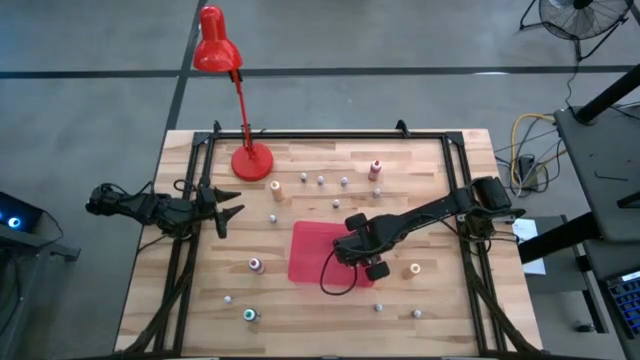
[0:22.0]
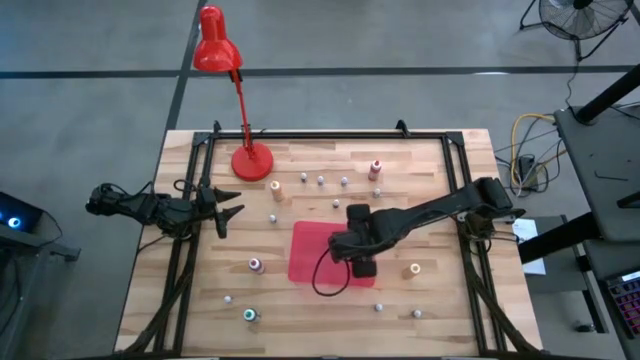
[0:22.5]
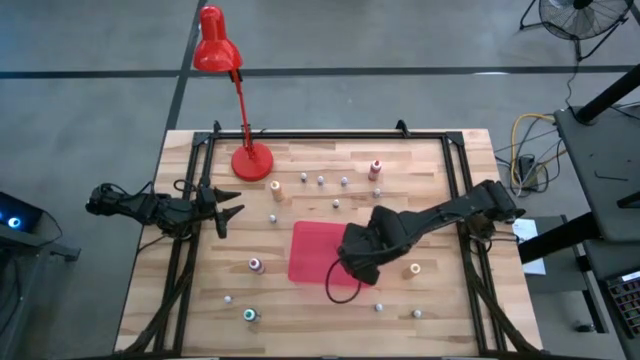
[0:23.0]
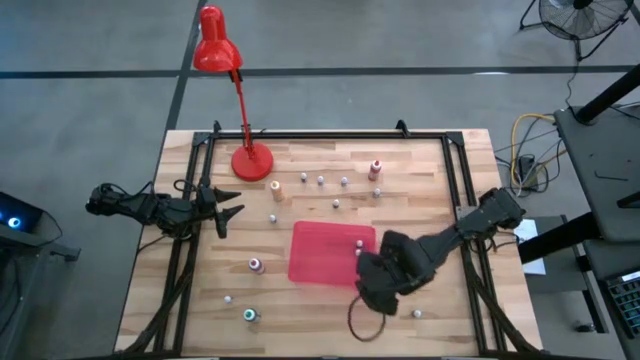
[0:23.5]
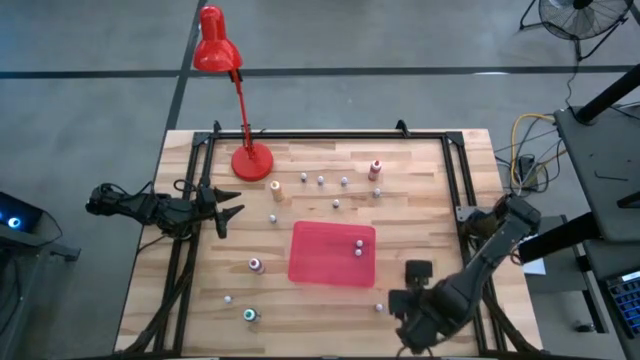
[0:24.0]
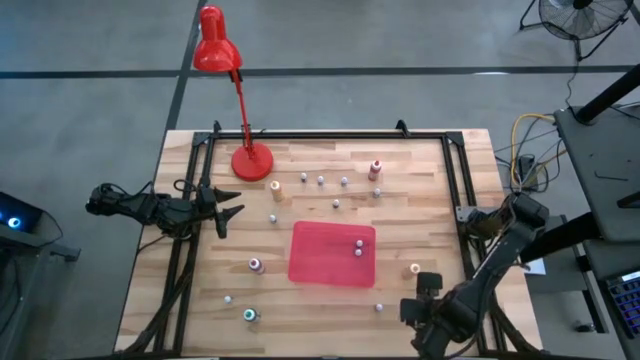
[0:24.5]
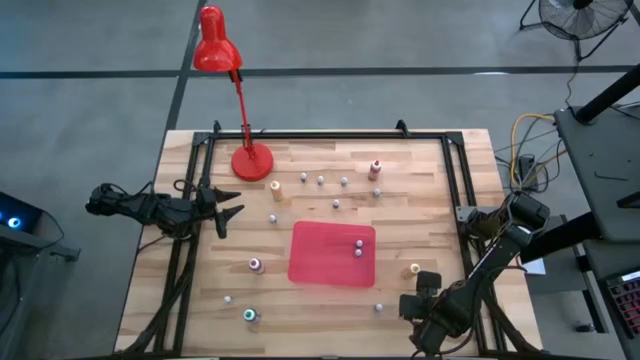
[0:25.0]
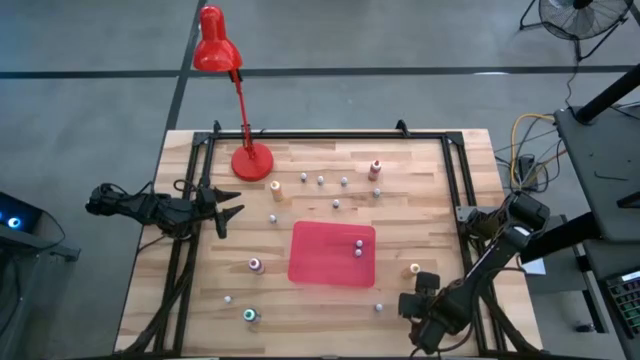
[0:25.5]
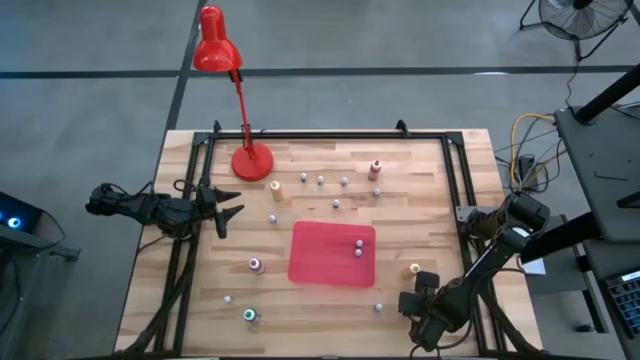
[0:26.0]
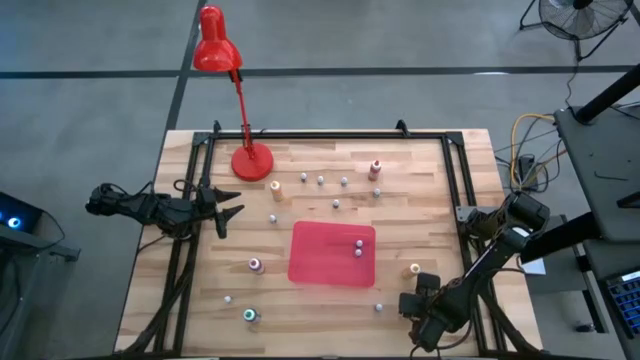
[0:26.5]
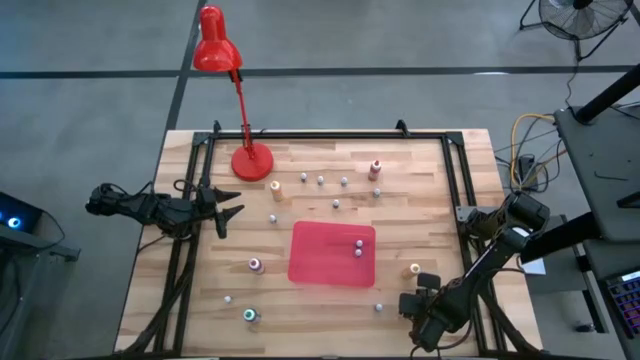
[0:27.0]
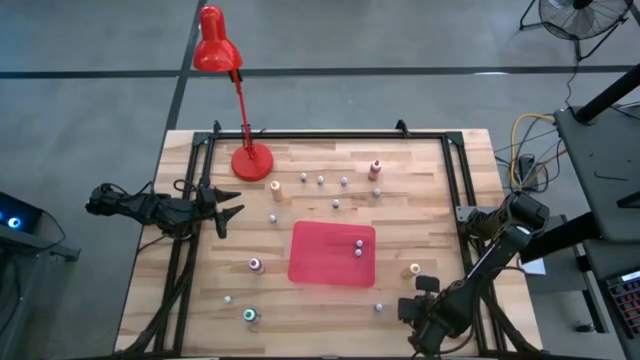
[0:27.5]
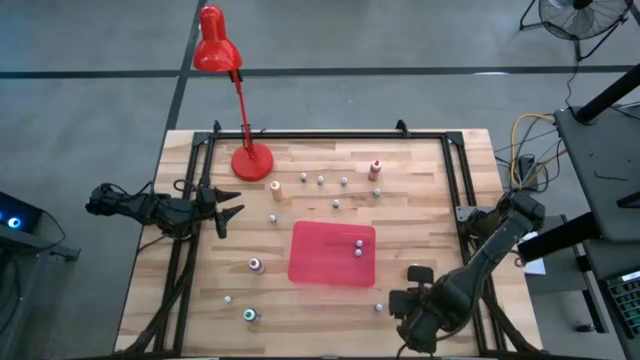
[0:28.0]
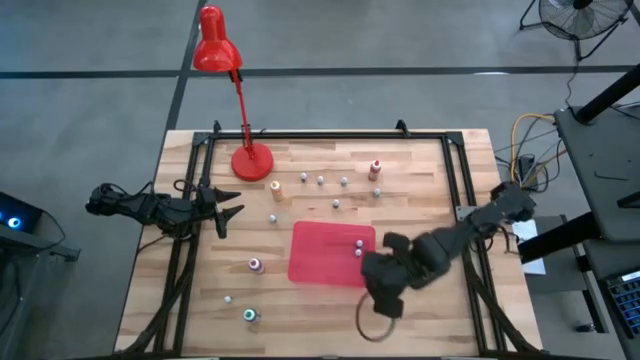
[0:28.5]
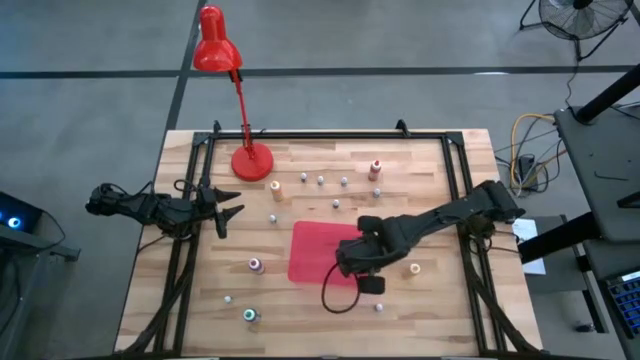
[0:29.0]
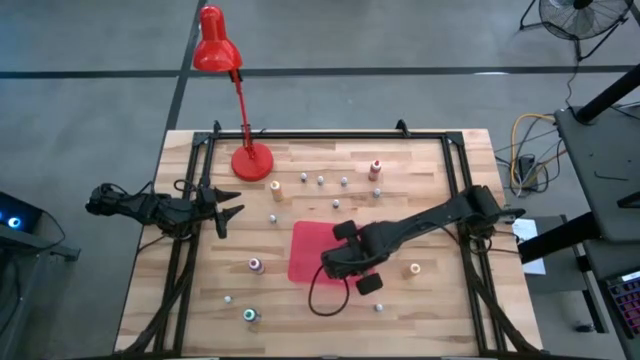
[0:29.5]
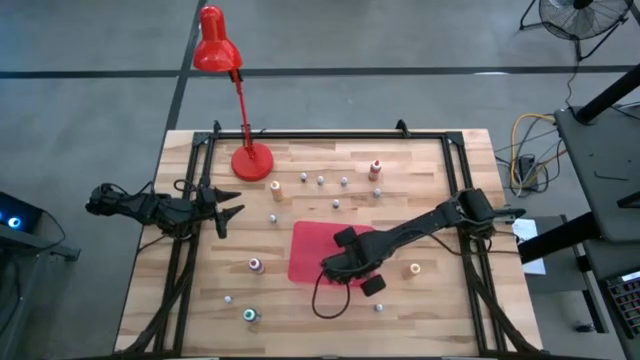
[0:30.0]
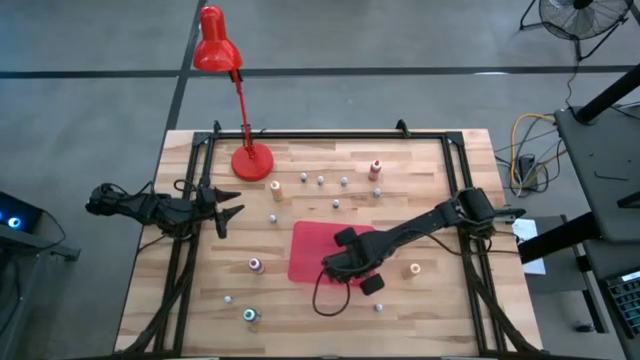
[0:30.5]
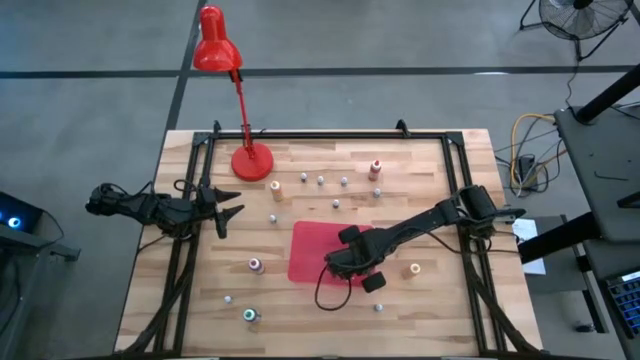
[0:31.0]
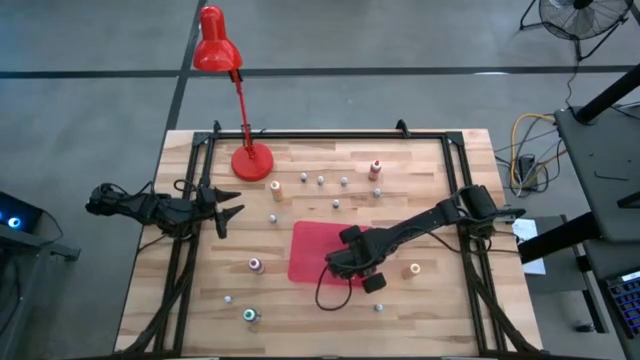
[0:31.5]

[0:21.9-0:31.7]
Task: Pick & Place food coloring
Put the small green food coloring bottle in the red bin

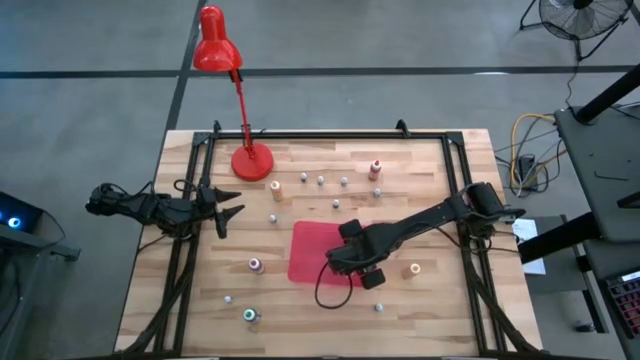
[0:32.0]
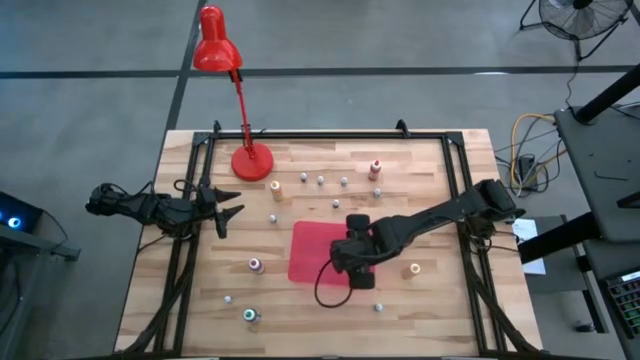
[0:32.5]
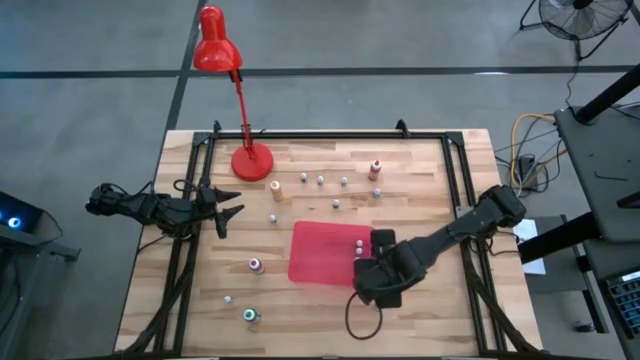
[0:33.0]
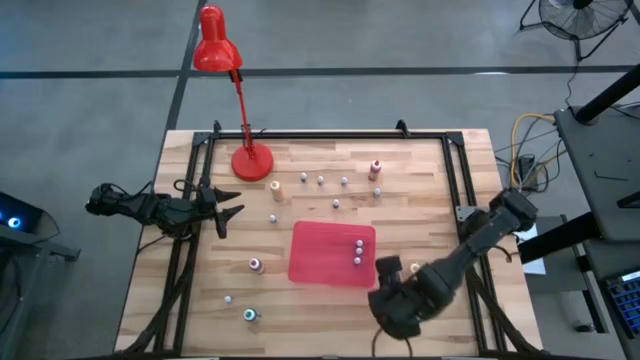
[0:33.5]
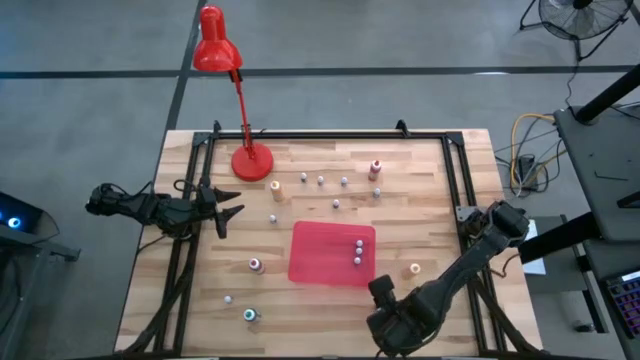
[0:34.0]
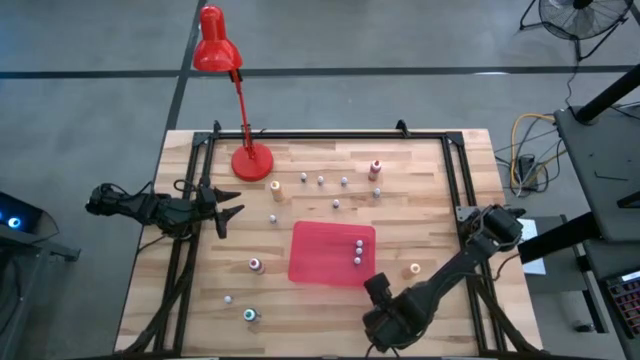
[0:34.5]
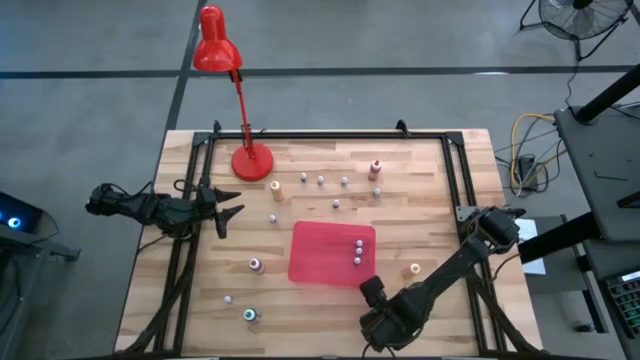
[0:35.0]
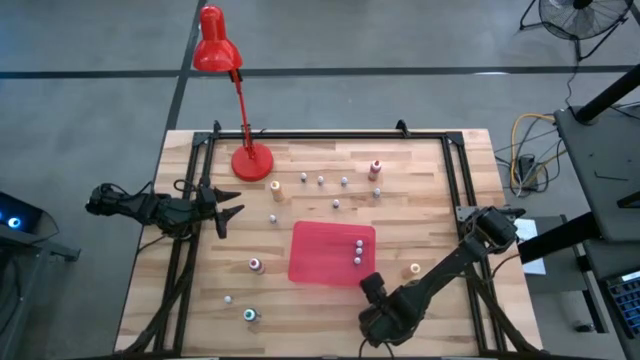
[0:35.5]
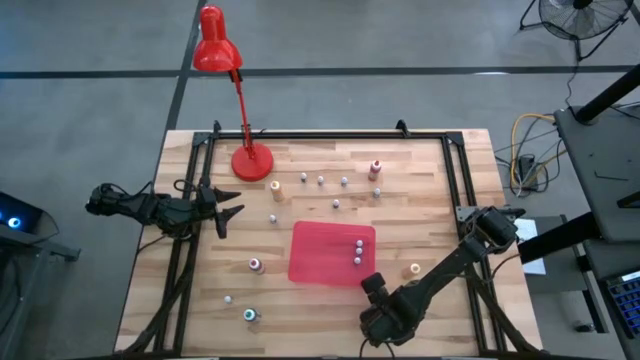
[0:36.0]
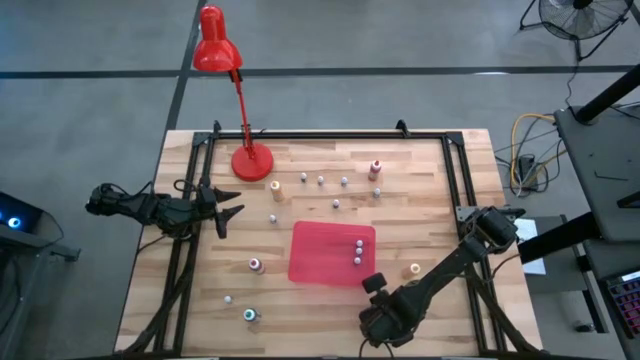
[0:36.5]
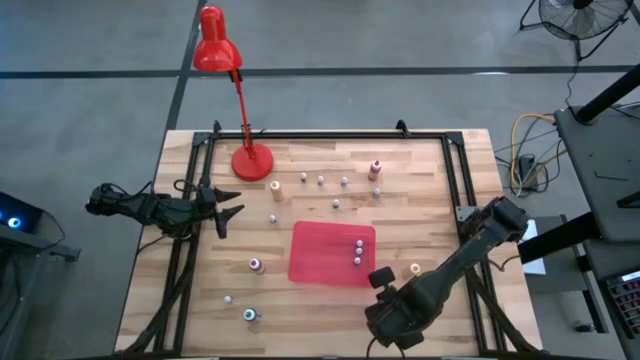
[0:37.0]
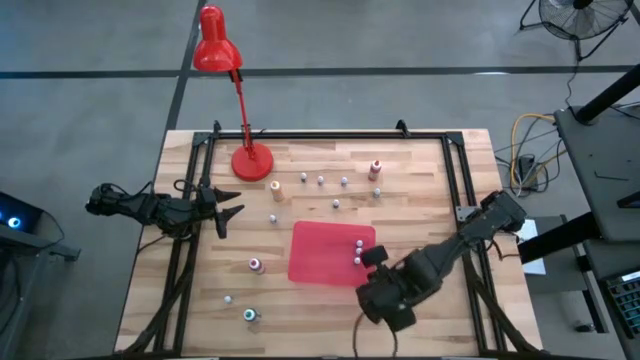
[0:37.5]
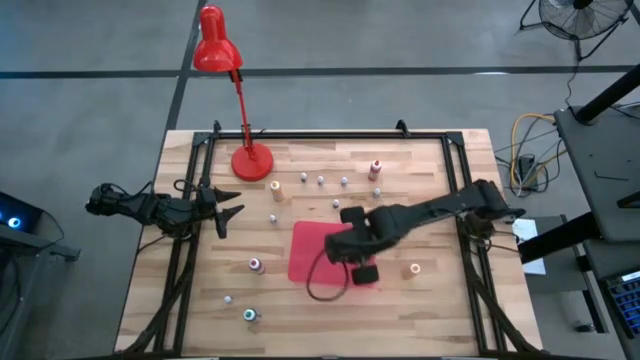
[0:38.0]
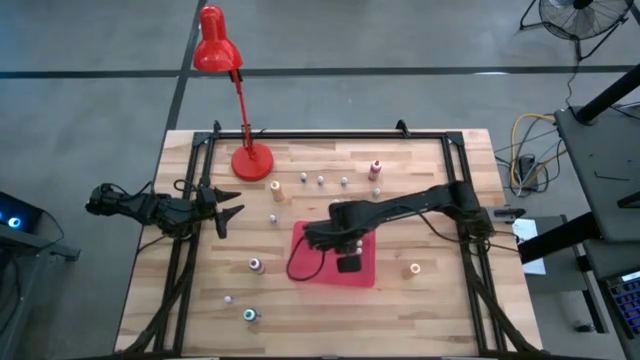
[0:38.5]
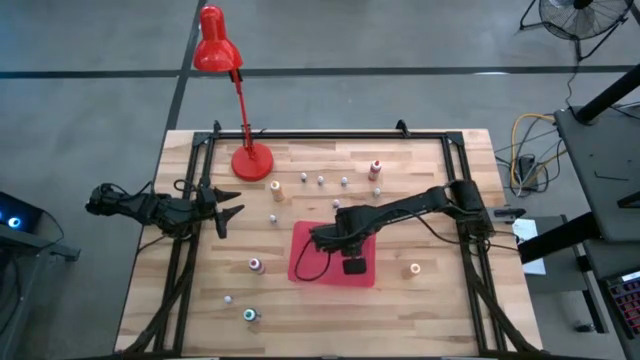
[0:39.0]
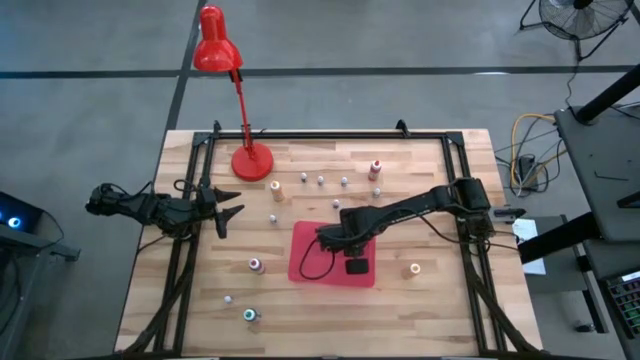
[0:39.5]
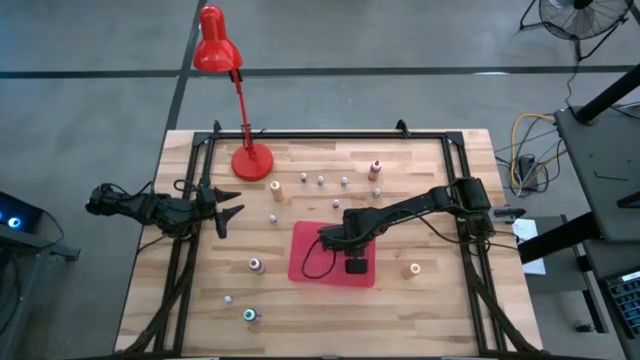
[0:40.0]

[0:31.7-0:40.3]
Put the small purple food coloring bottle in the red bin

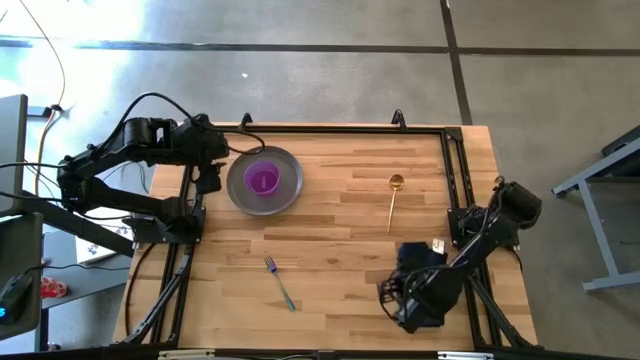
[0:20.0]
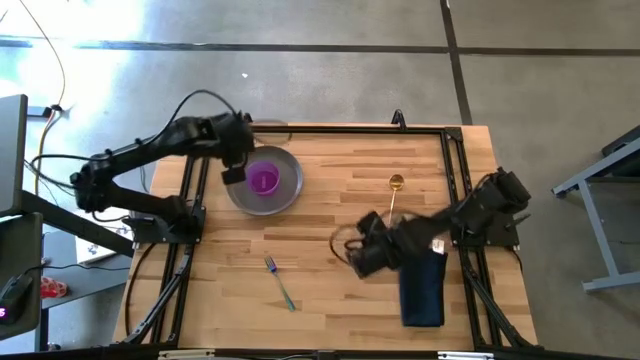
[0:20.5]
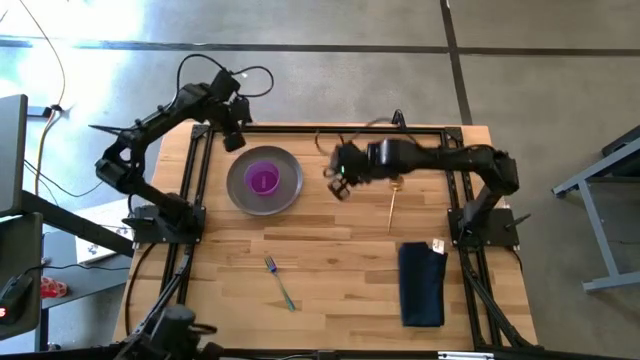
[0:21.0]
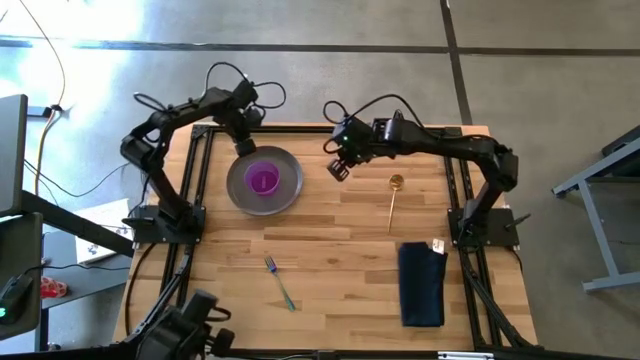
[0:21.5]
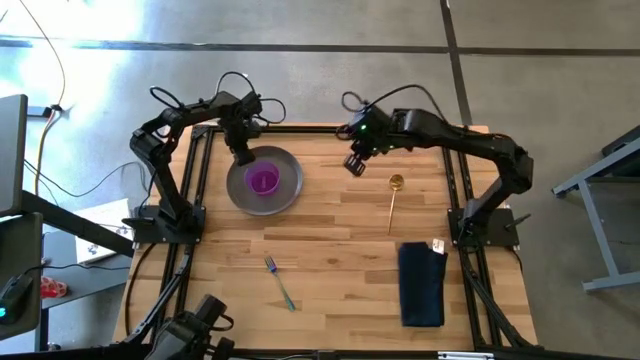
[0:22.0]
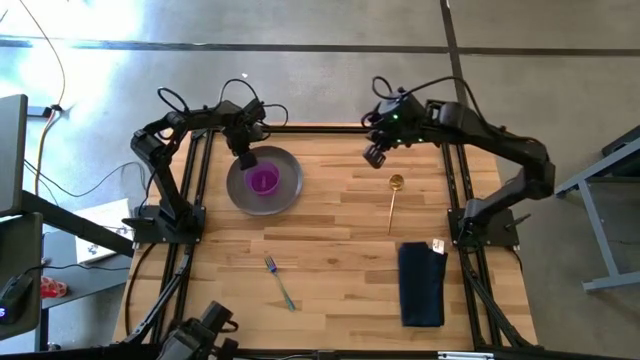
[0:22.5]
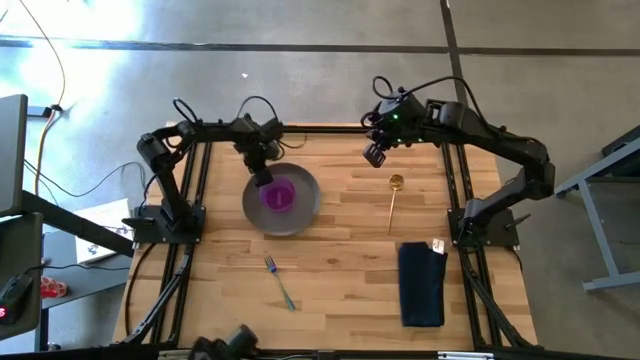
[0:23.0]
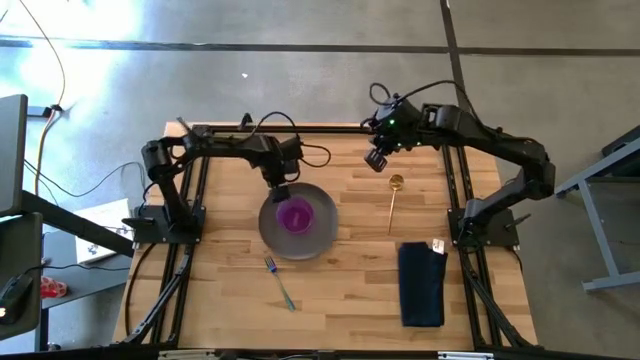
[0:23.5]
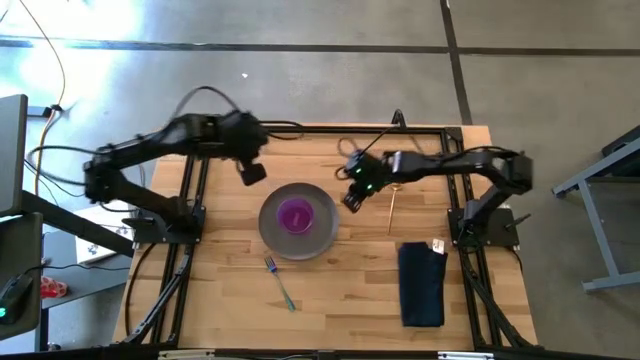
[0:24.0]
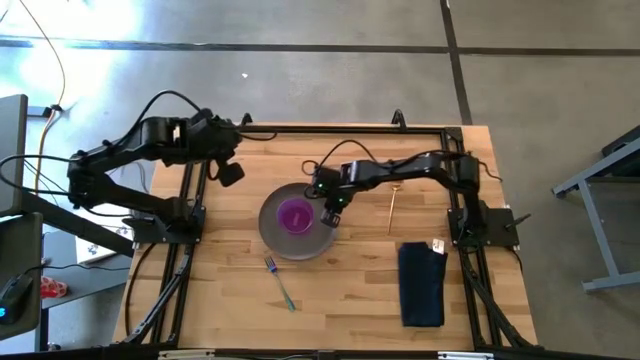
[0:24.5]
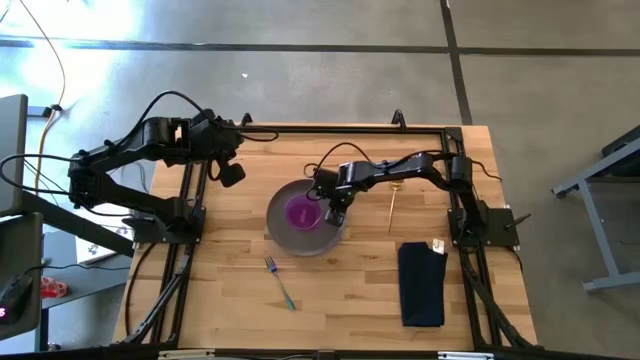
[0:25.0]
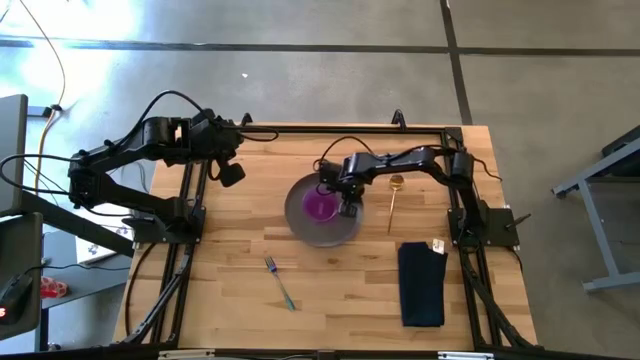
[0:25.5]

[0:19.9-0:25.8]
Task: Set table place
Move the gray plate to the center of the table
